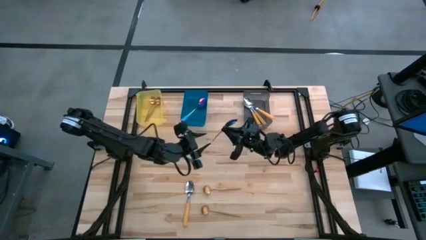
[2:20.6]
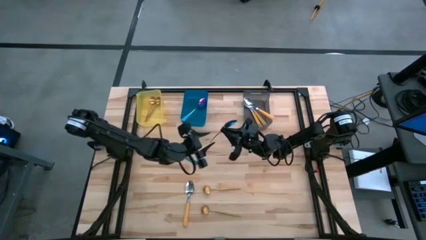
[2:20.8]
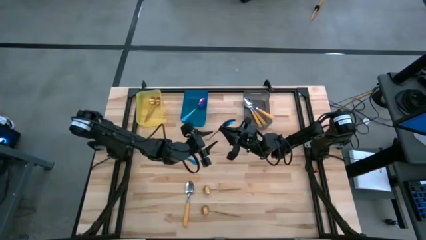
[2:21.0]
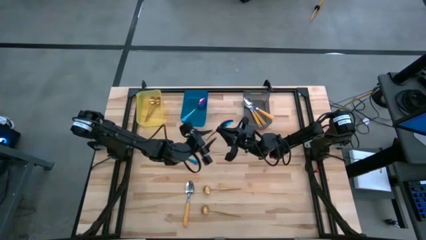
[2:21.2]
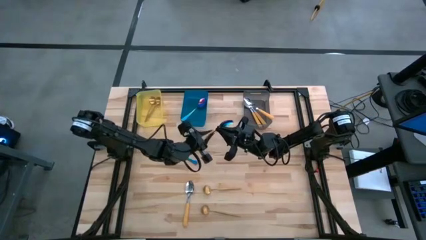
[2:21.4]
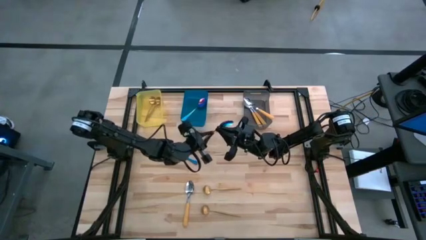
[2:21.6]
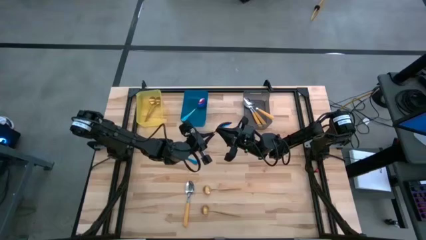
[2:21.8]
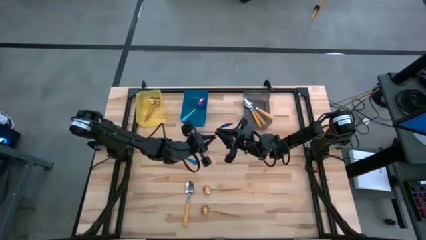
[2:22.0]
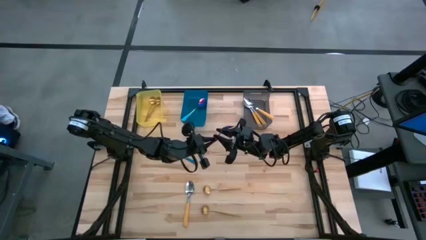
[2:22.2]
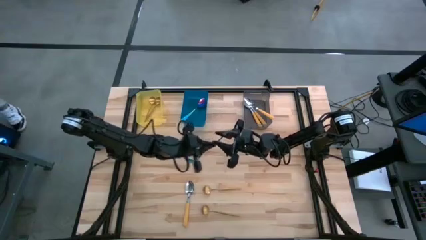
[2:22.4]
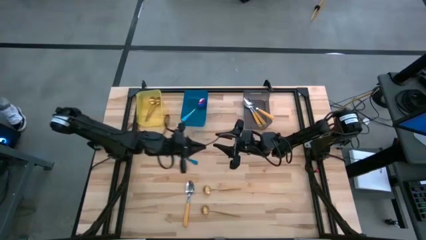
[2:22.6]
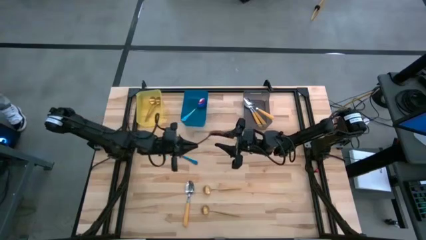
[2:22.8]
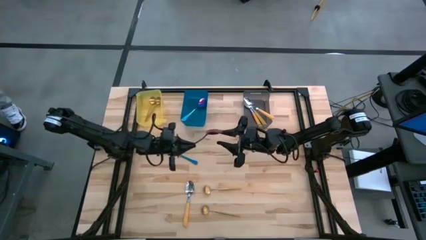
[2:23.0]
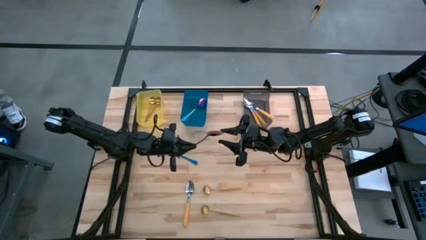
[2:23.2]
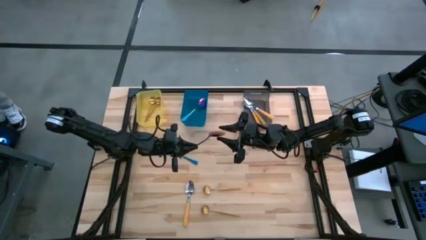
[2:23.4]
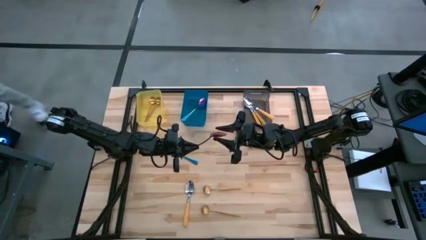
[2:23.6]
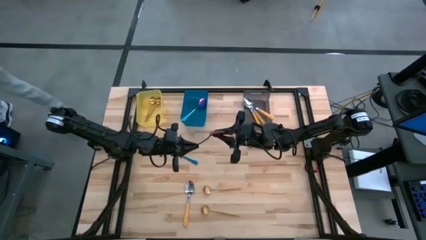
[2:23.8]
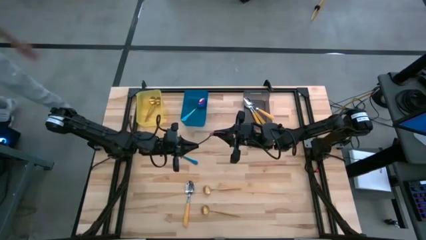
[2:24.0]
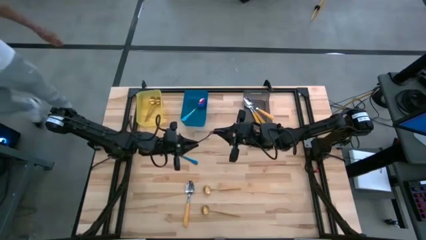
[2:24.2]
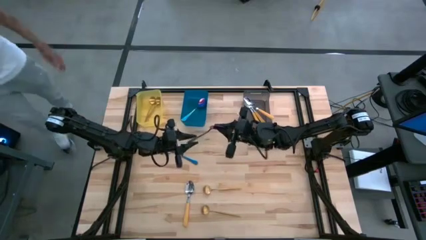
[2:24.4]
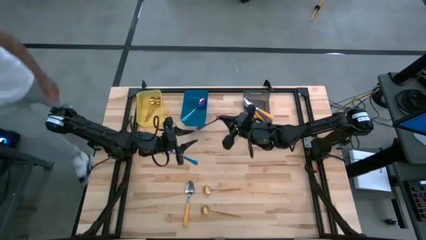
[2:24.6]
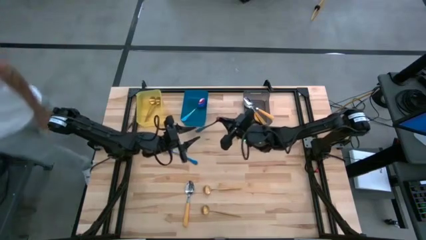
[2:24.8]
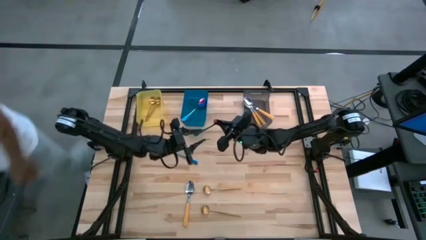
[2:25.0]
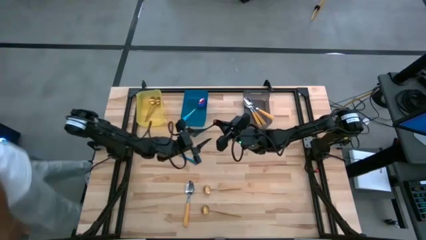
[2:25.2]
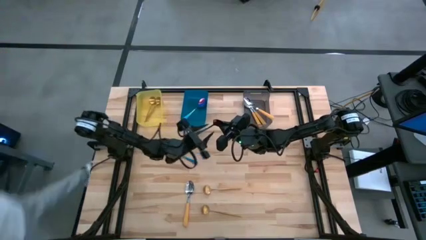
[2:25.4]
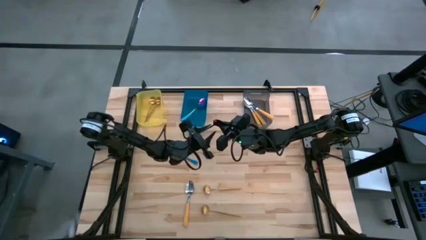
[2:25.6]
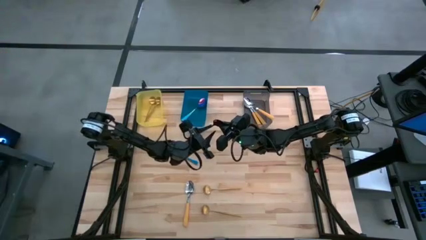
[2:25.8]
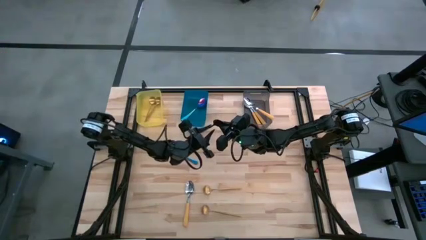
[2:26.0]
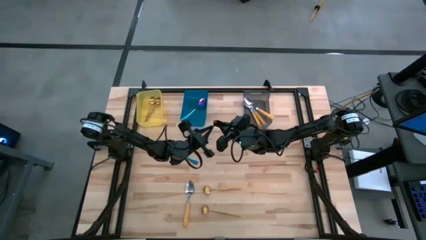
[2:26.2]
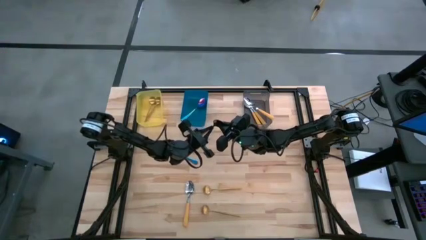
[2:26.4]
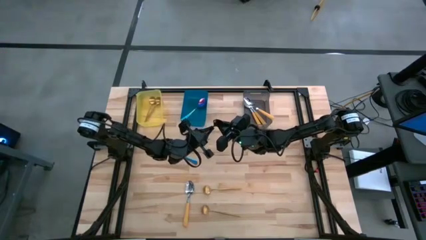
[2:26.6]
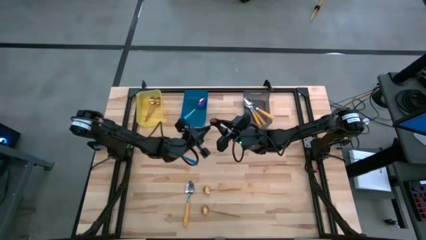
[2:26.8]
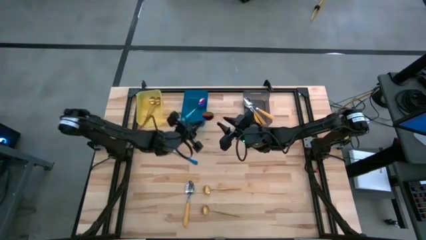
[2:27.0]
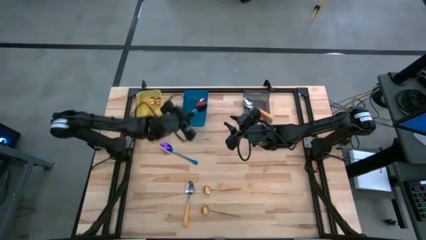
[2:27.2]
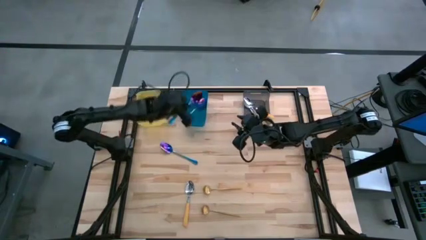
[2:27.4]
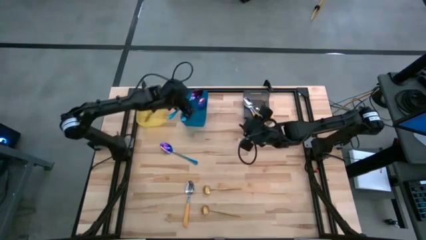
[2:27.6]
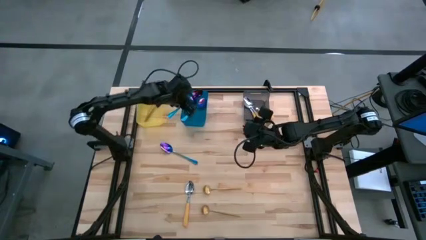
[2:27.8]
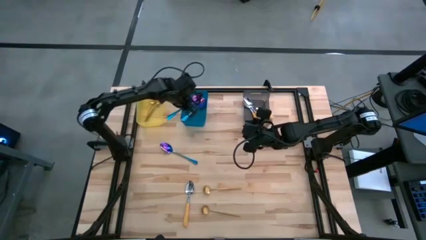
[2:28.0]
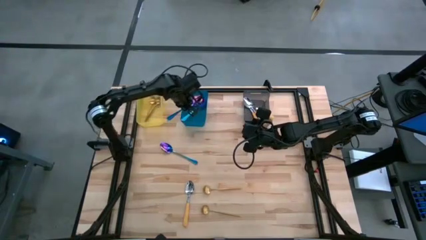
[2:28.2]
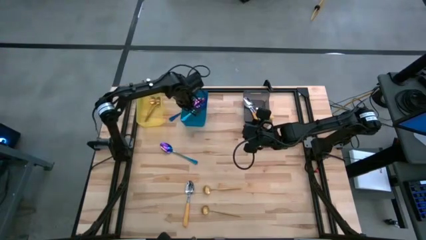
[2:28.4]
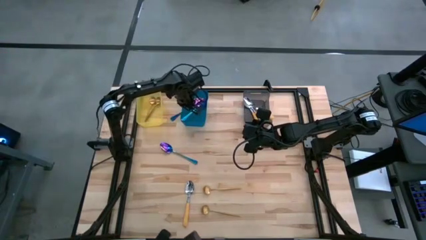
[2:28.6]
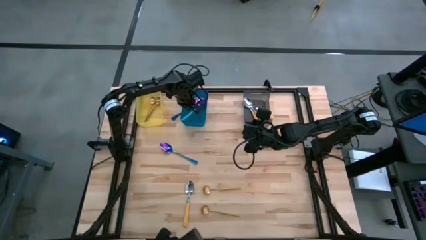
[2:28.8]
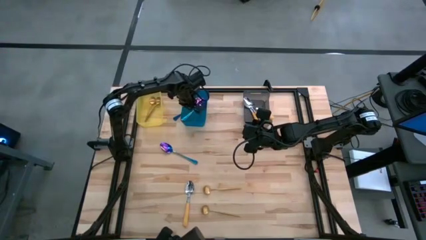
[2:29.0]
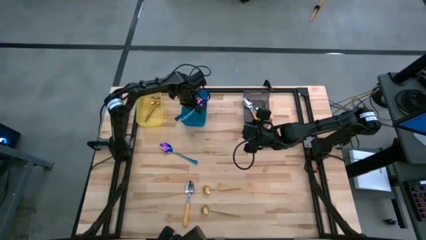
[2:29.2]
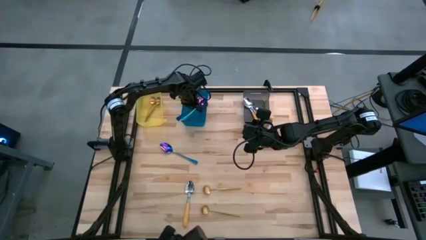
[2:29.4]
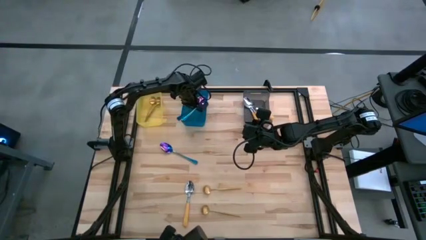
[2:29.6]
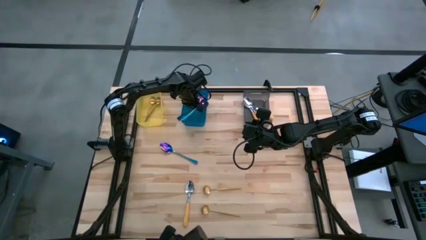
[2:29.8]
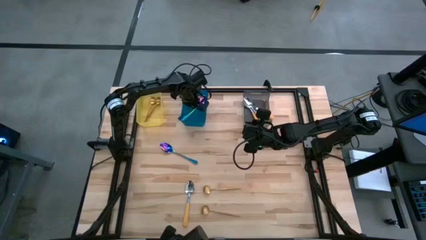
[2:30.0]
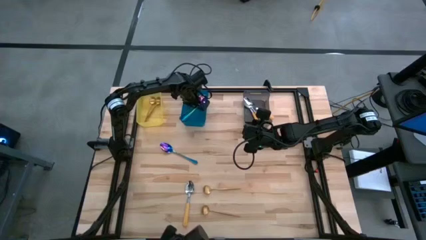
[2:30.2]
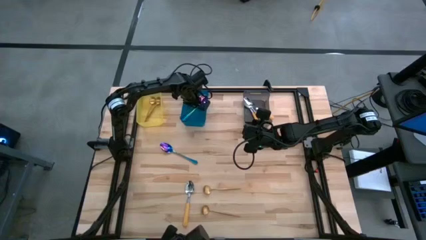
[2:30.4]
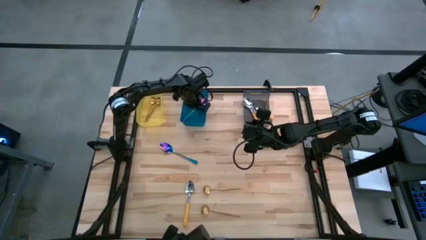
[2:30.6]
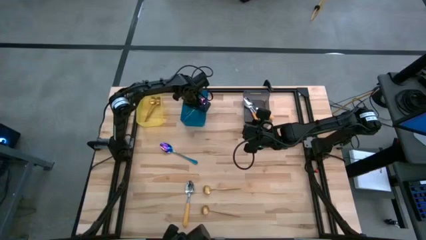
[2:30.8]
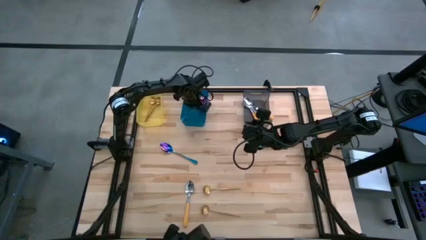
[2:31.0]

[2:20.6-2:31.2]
Task: Sort silverware by color (type)
Put the blue spoon into the blue bin

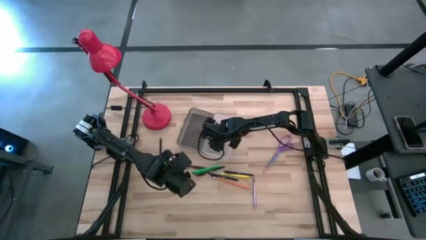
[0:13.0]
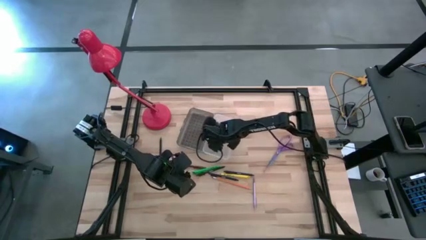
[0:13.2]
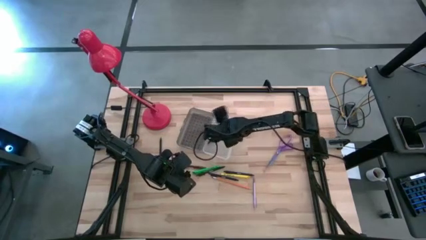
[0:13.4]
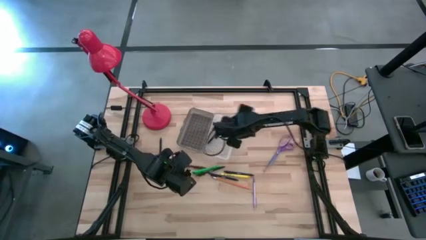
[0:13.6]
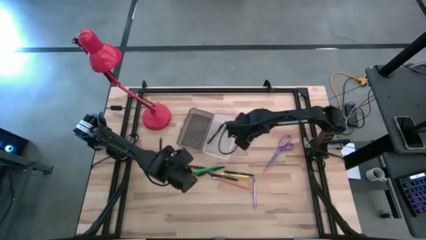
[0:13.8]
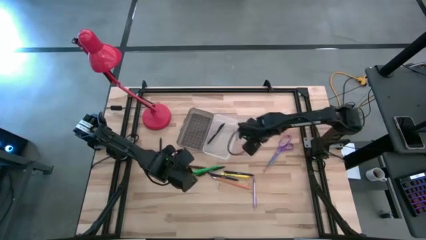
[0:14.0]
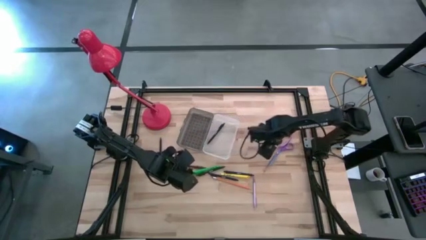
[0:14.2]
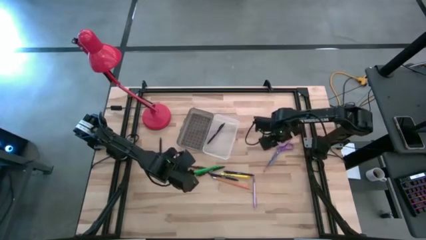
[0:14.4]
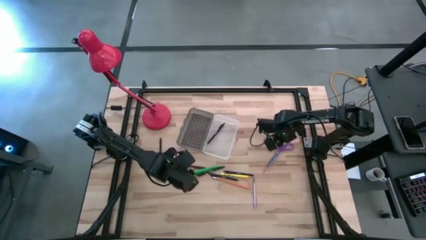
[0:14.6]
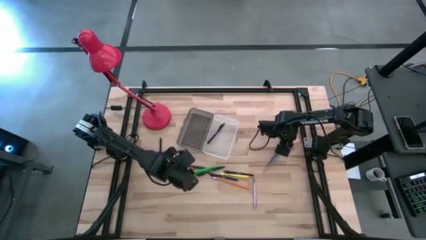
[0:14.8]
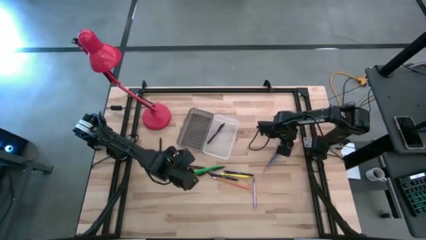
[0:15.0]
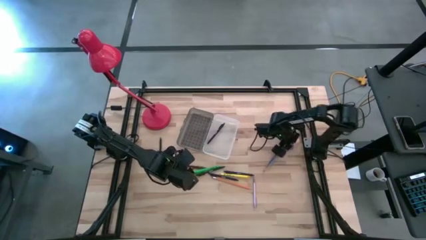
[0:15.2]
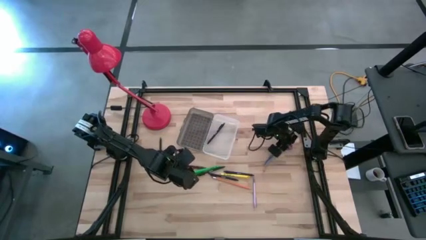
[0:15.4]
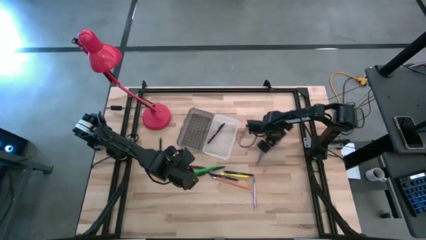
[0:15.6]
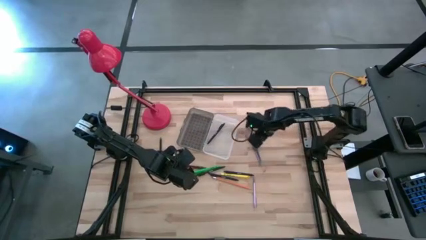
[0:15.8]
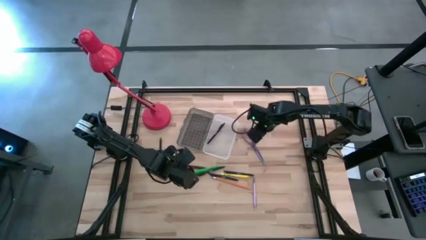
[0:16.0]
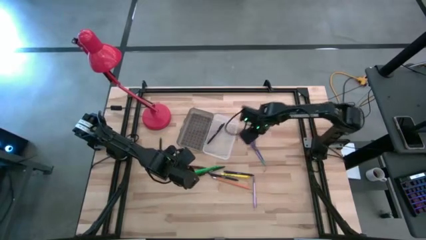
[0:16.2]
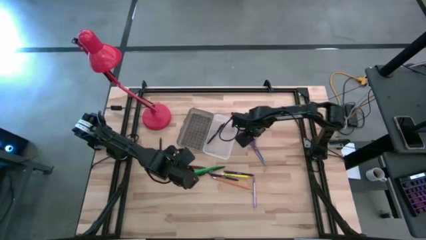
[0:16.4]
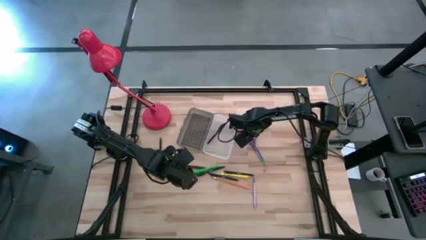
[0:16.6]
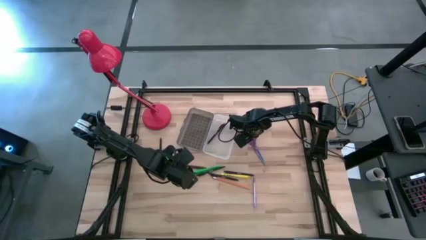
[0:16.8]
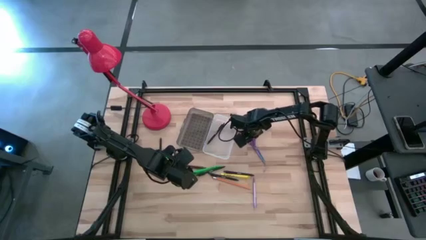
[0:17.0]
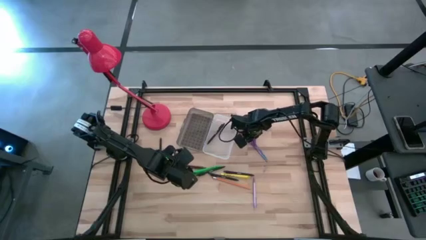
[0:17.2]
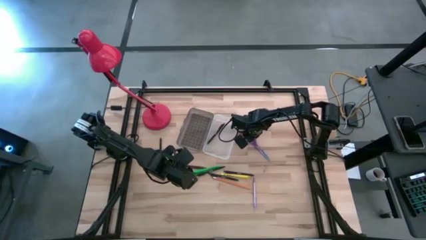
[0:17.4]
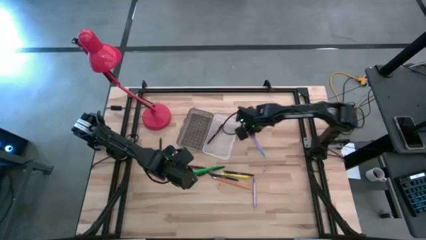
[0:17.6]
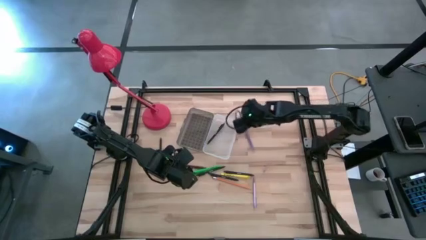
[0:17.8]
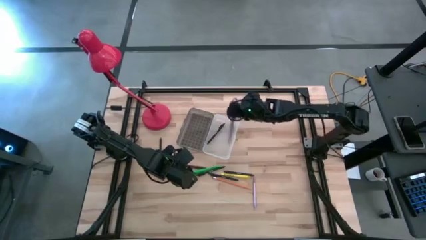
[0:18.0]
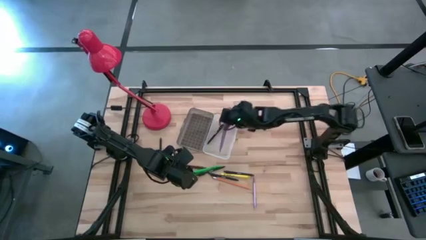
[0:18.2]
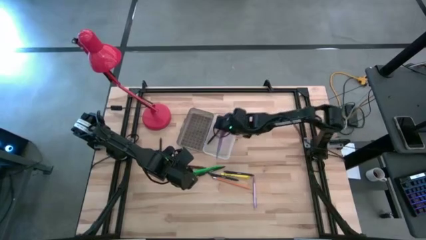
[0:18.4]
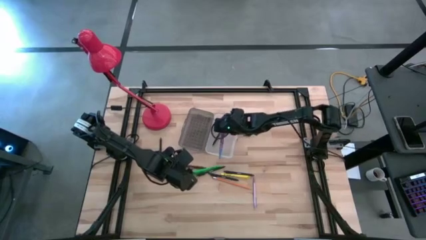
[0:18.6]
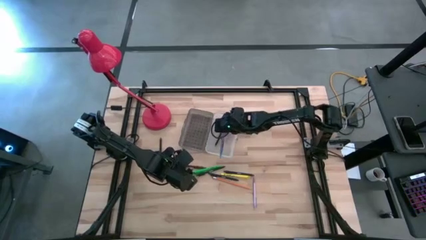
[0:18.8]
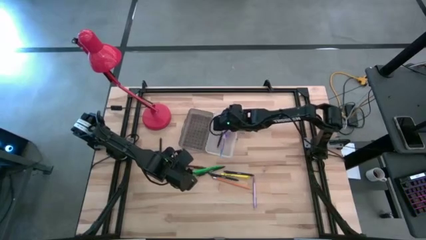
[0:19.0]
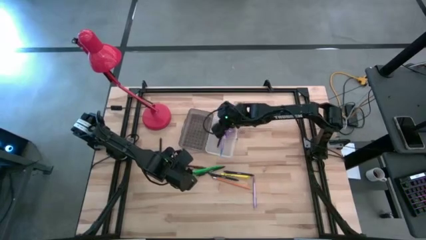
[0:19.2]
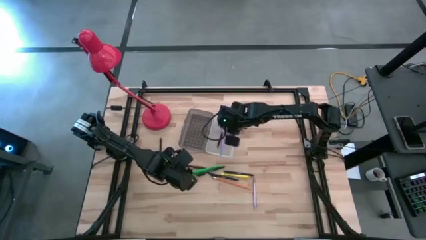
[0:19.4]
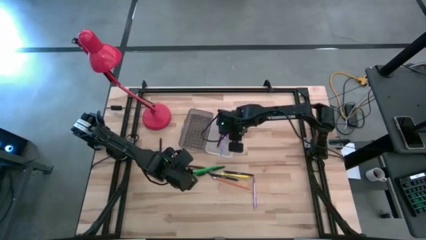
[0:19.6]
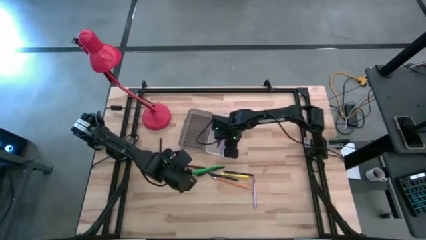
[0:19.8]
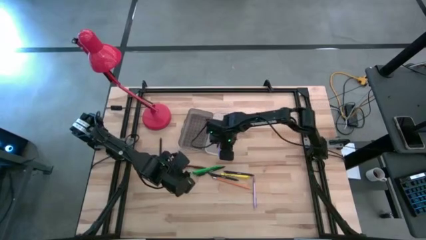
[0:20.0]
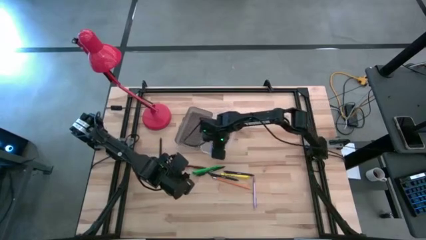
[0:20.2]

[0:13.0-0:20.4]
Task: Pick & place school supplies into a supply box
Put the purple scissors into the supply box
